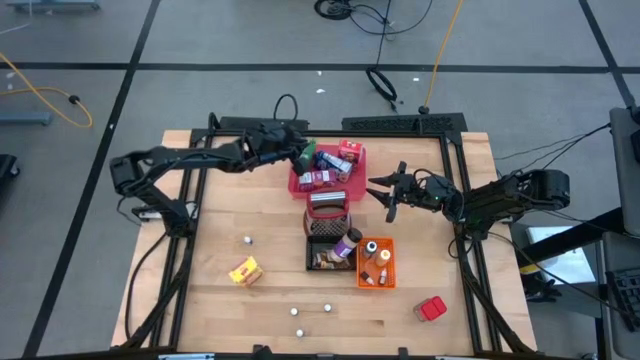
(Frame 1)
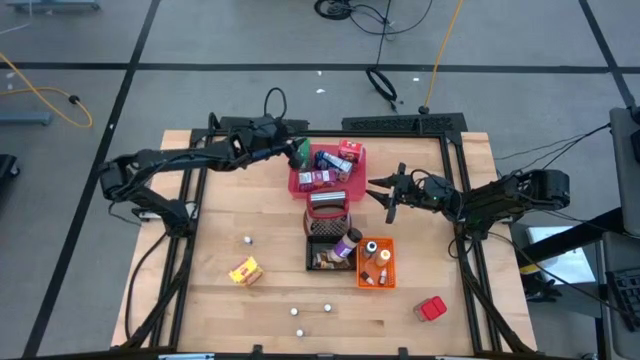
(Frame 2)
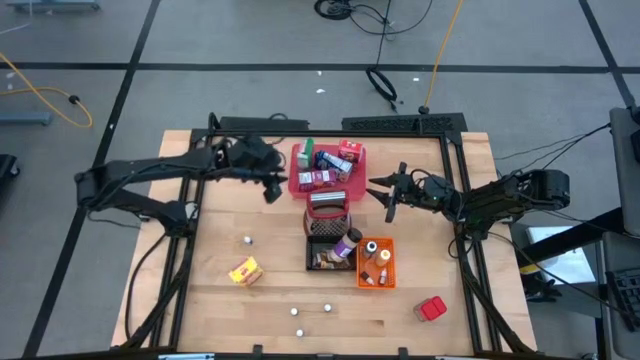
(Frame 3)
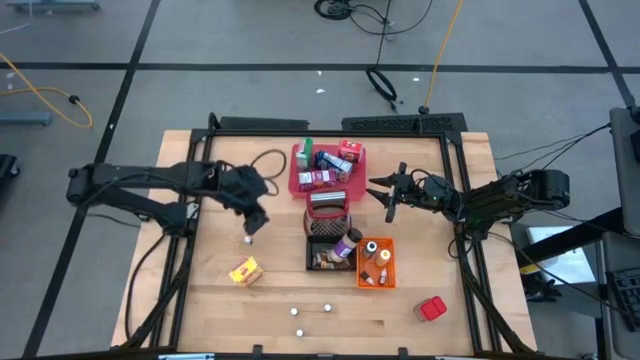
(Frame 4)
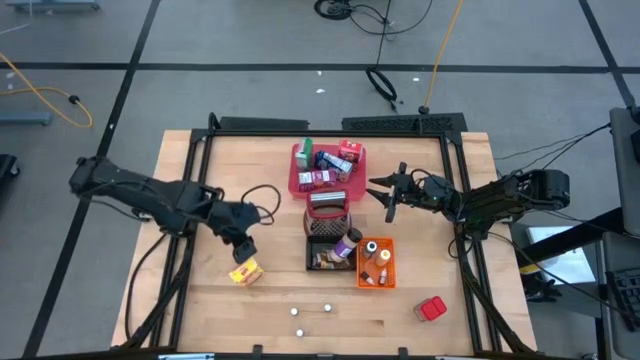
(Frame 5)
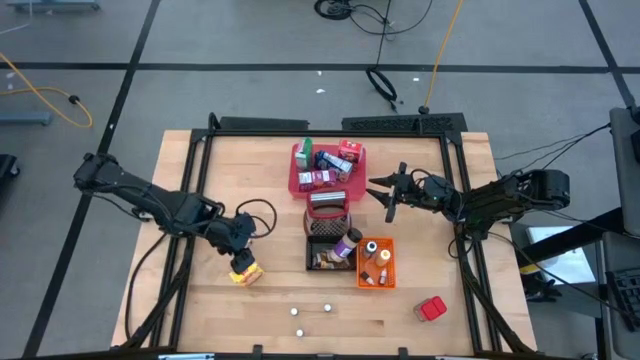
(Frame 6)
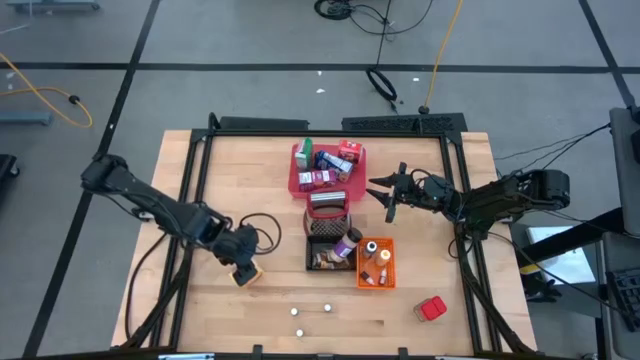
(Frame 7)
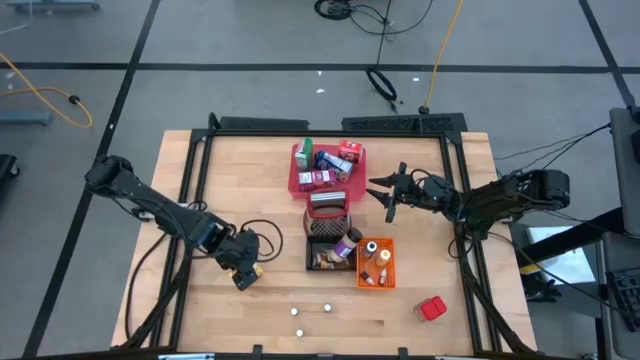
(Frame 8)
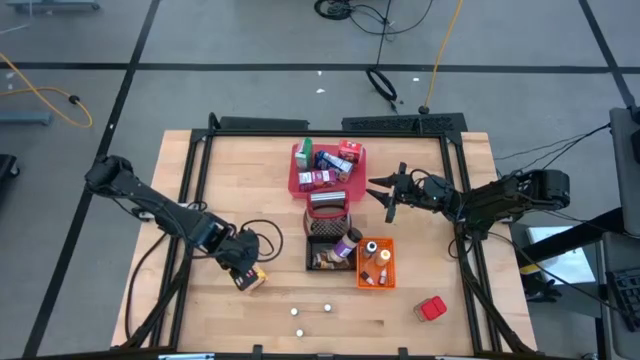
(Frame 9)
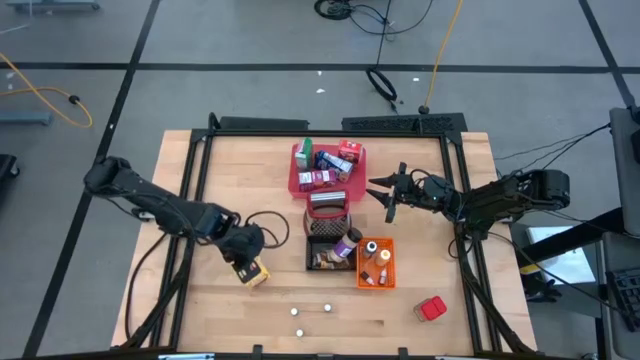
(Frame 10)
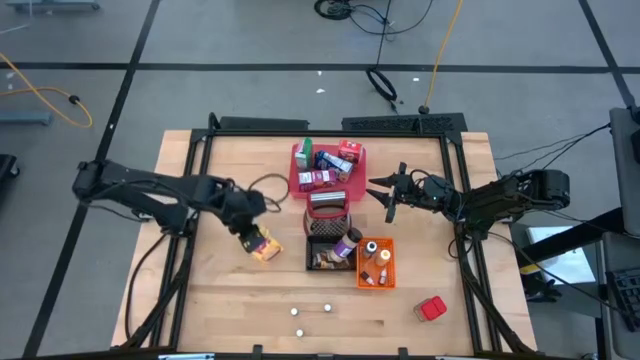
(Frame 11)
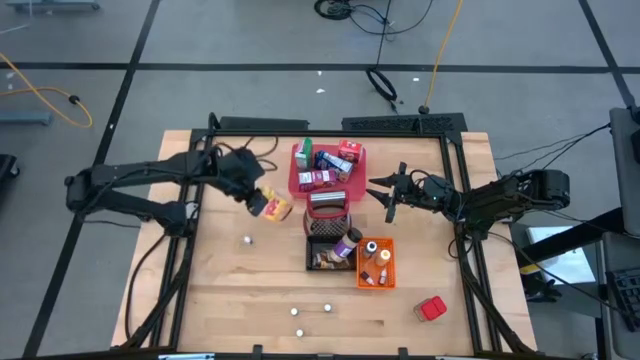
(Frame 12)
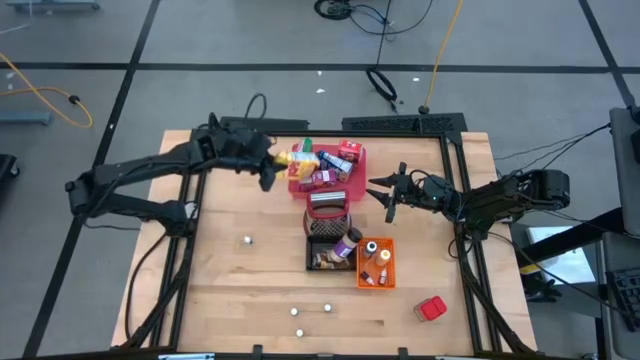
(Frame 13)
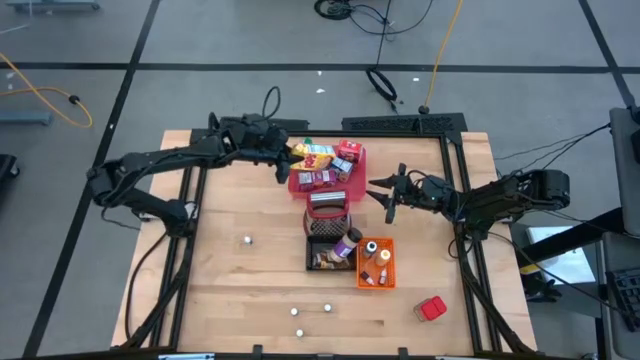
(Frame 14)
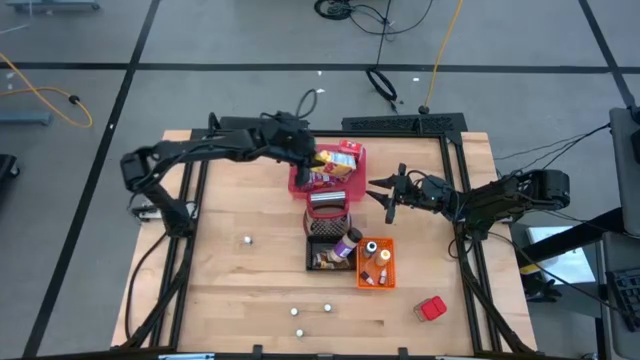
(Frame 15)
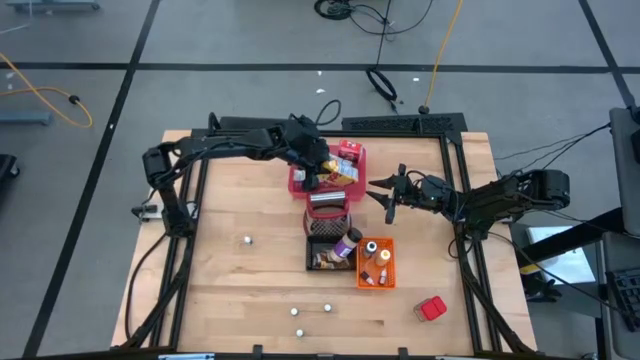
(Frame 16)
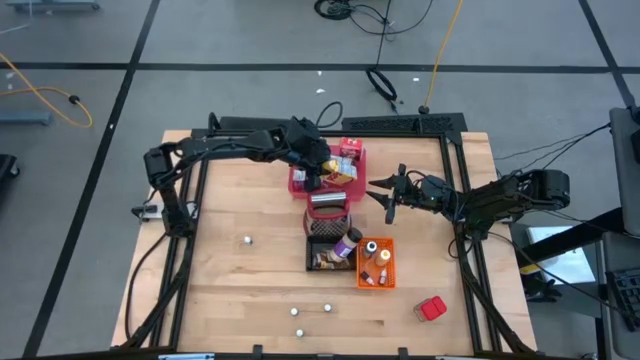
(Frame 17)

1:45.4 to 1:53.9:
Task: Pick & Place Kitchen Items
Put the yellow cereal box into the red bin

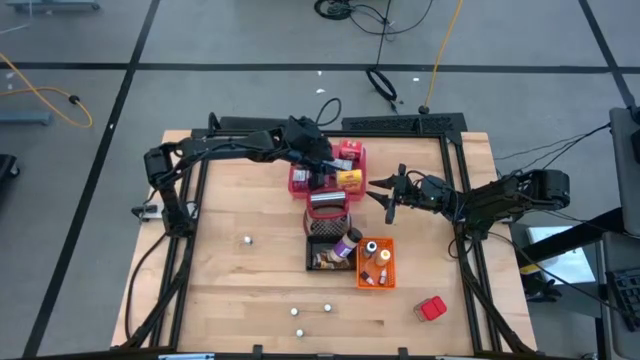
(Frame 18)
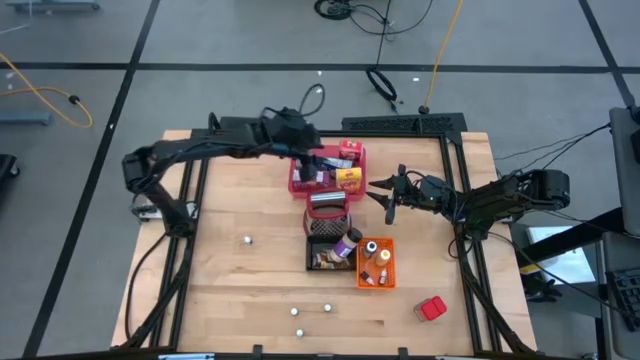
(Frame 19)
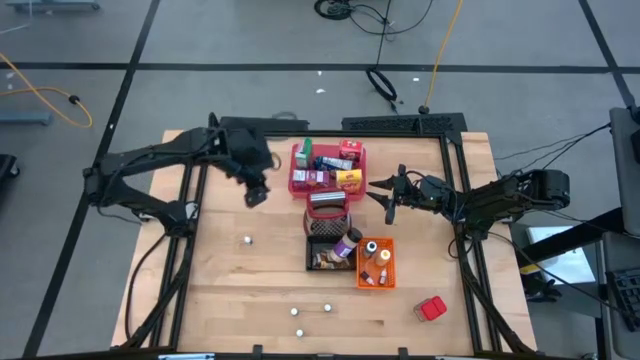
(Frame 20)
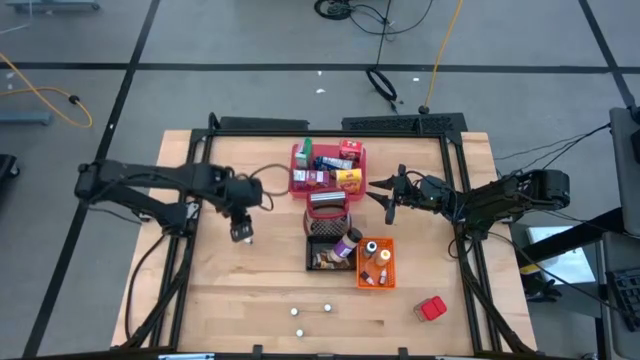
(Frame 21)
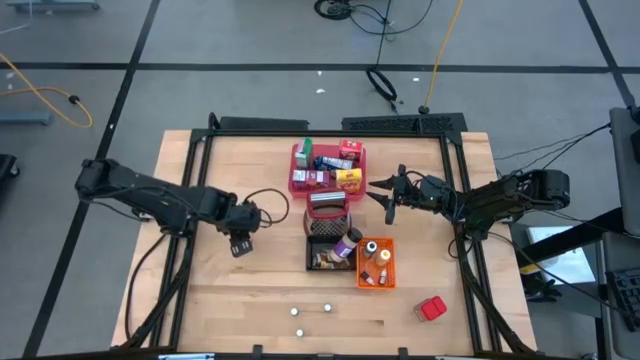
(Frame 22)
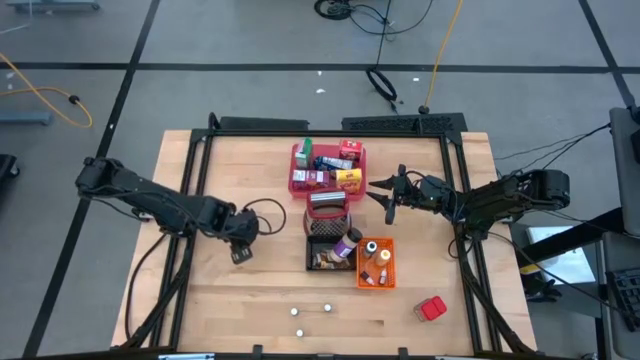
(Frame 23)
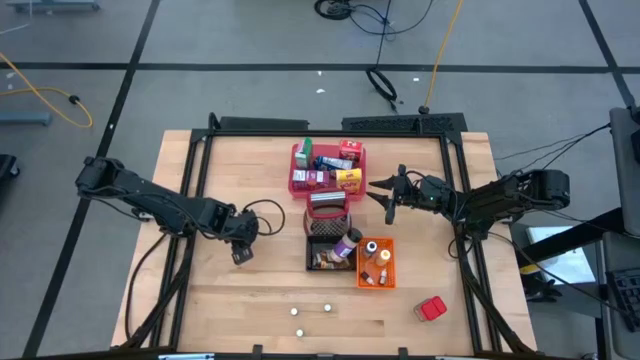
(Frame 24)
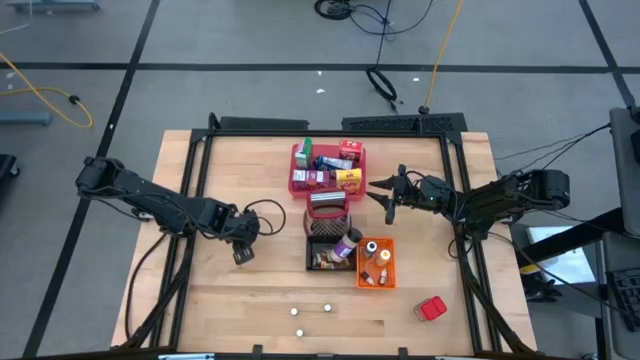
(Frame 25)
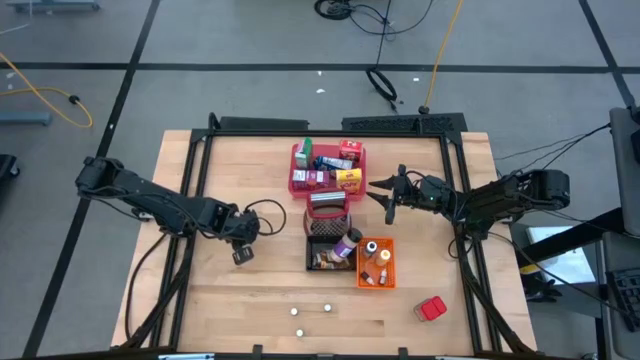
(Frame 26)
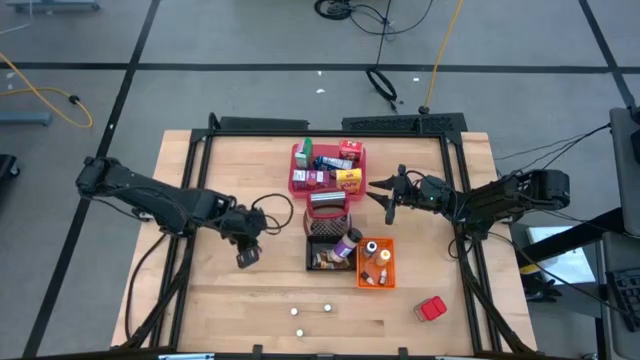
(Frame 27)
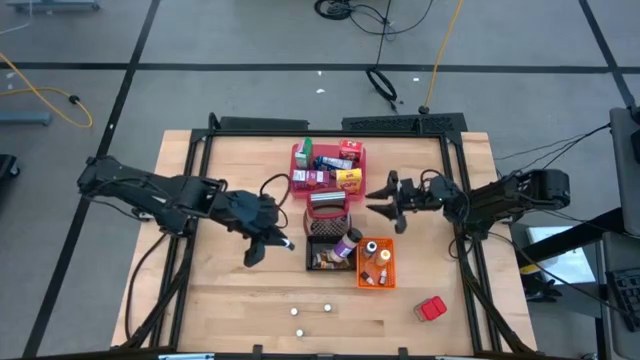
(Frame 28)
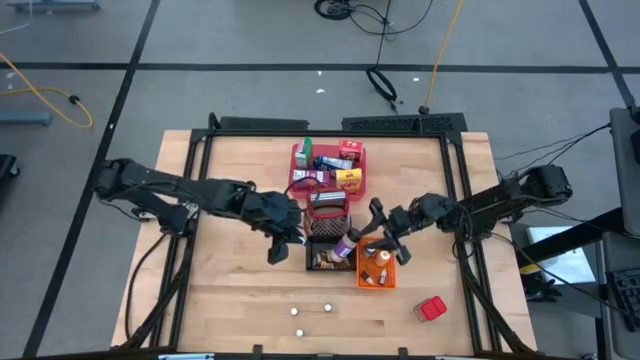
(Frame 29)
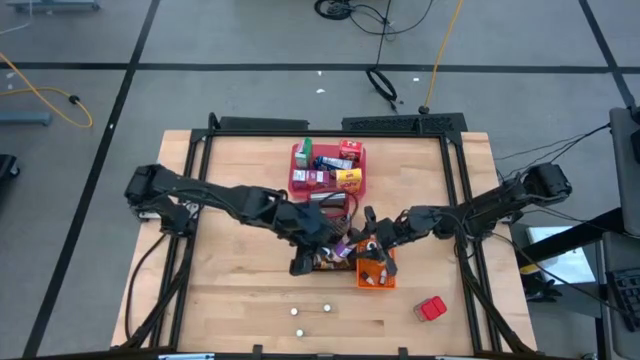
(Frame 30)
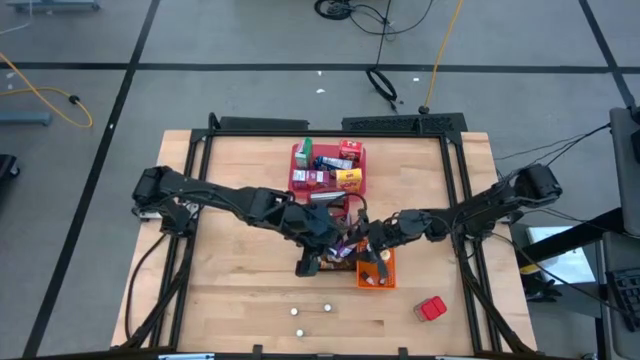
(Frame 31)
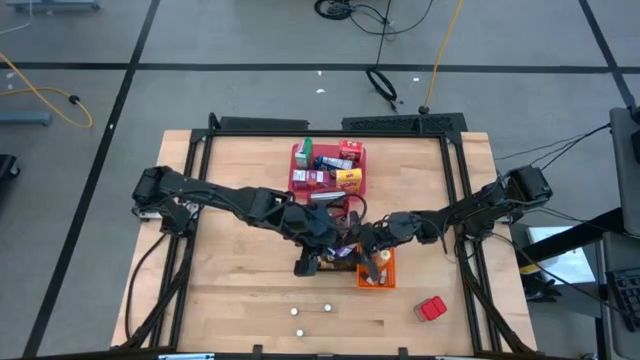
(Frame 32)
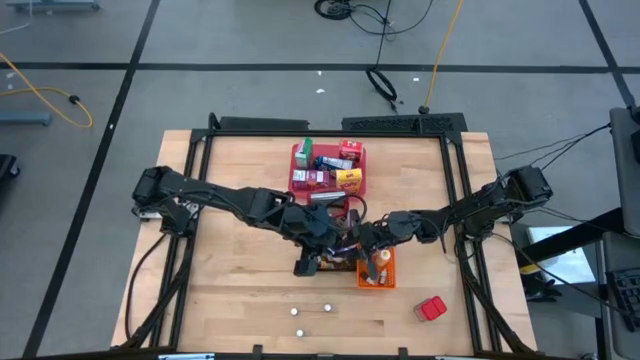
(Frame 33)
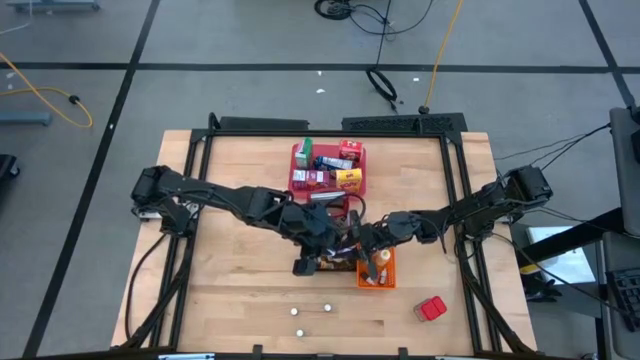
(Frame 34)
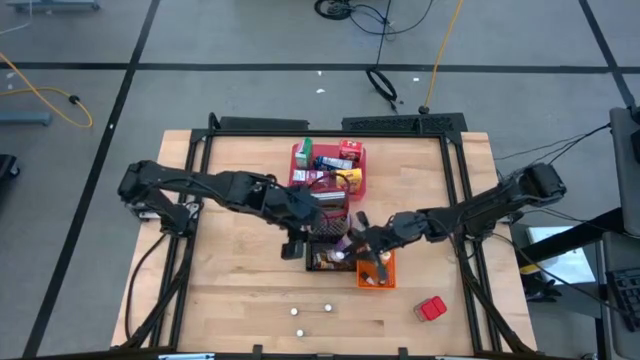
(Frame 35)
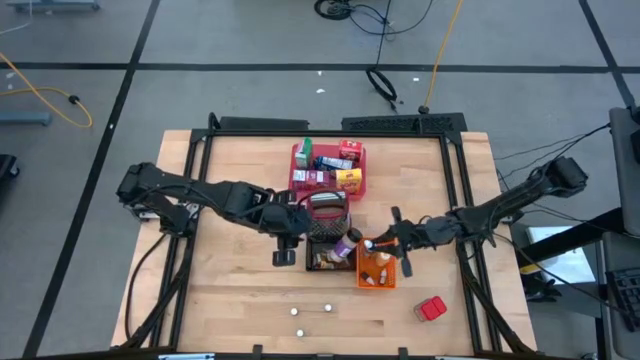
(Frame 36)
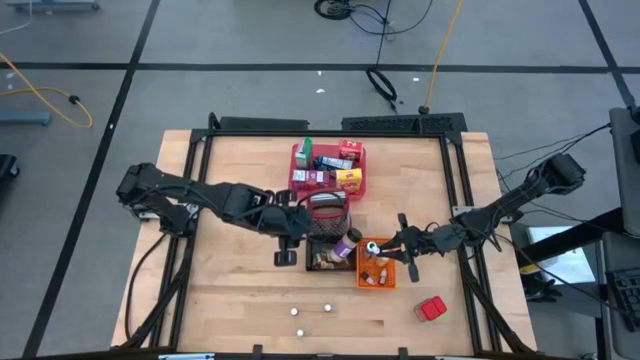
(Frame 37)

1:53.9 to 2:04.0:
Put the small black food coloring bottle into the orange bin

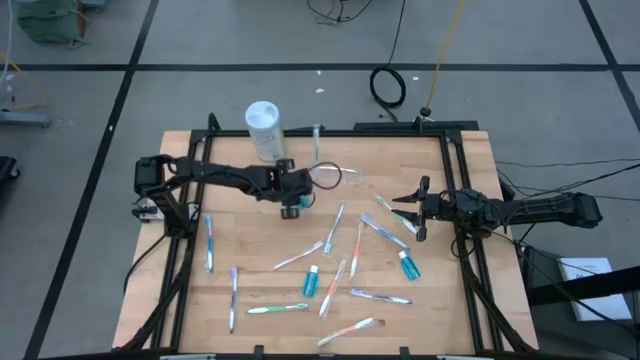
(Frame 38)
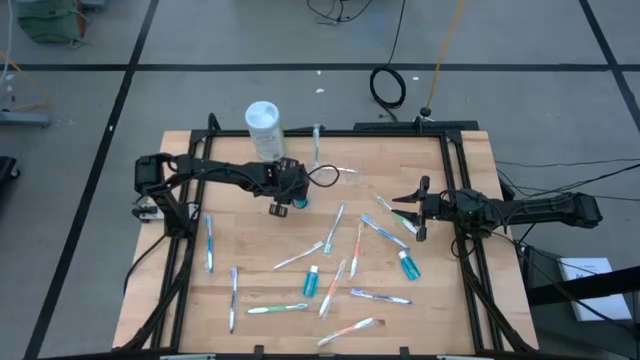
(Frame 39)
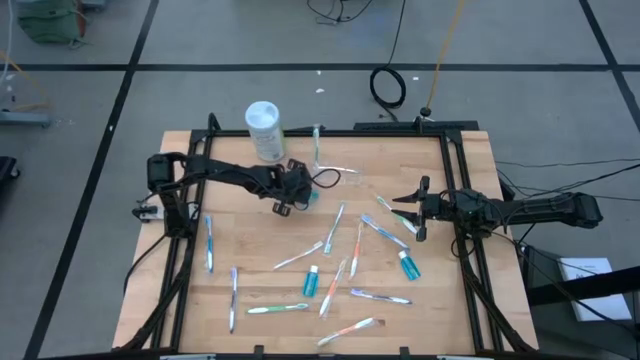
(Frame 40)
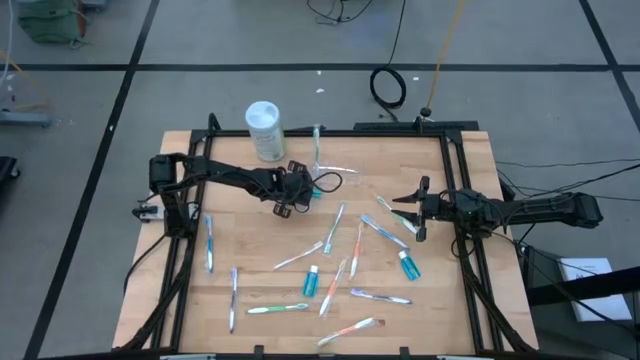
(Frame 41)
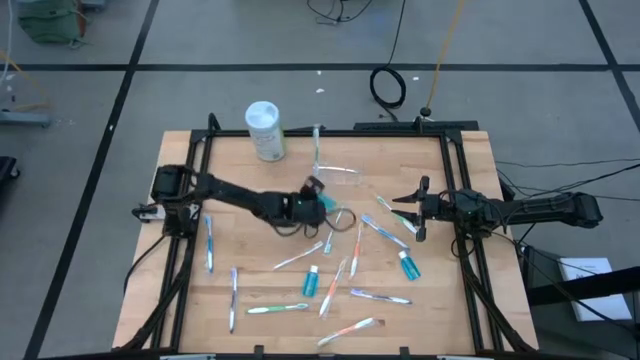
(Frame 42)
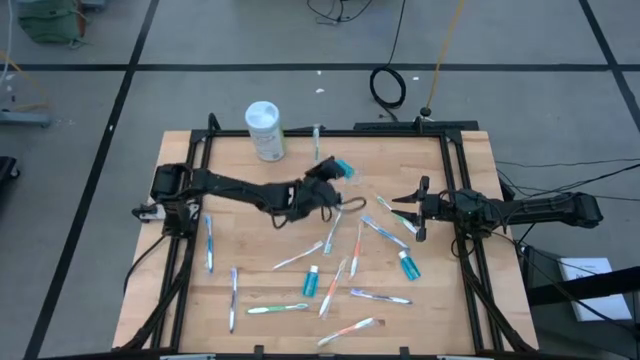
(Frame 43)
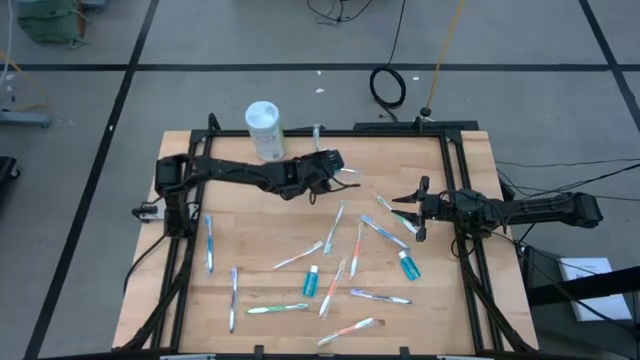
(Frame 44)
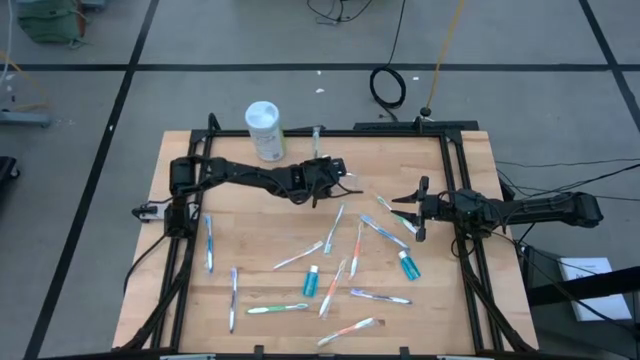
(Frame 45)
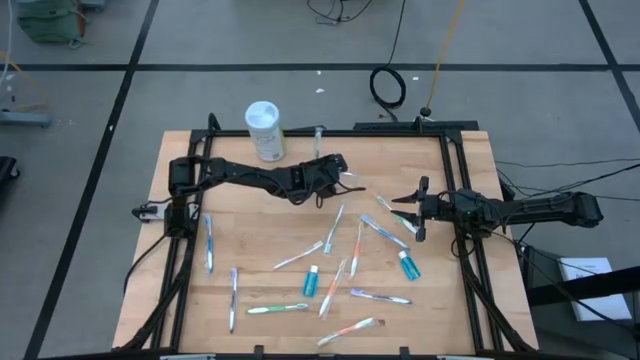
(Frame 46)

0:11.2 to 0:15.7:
Task: Pick & Place toothbrushing station
Put the blue mouthwash into the transparent organizer
